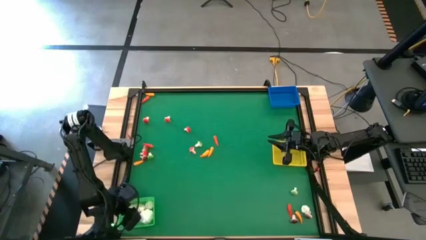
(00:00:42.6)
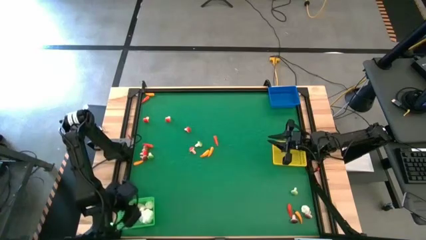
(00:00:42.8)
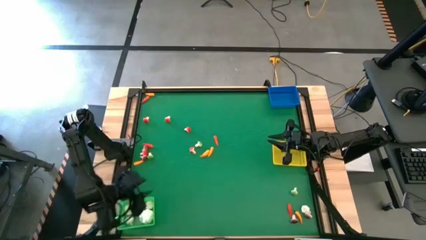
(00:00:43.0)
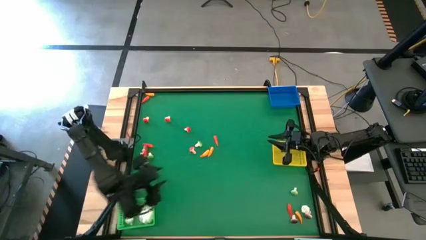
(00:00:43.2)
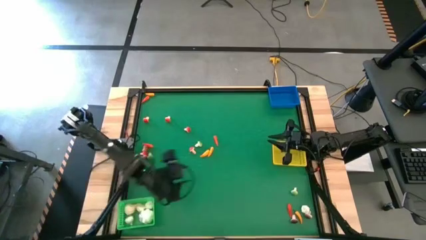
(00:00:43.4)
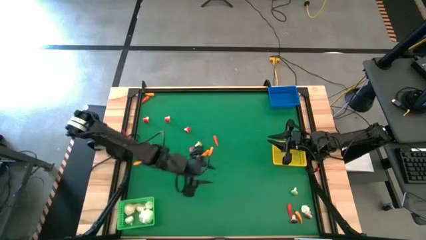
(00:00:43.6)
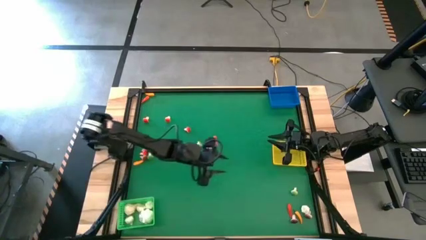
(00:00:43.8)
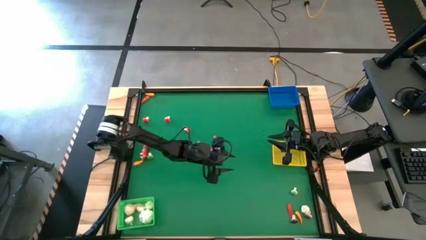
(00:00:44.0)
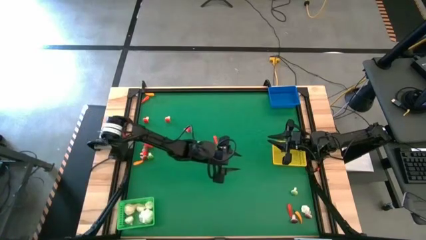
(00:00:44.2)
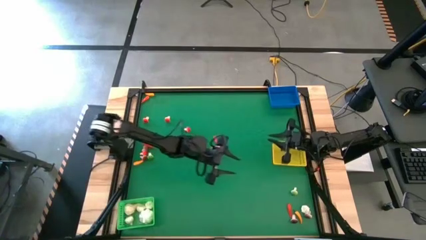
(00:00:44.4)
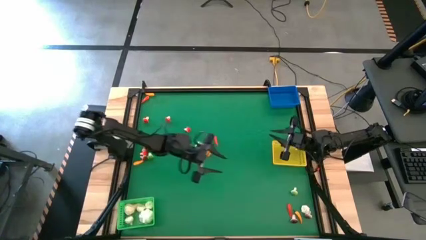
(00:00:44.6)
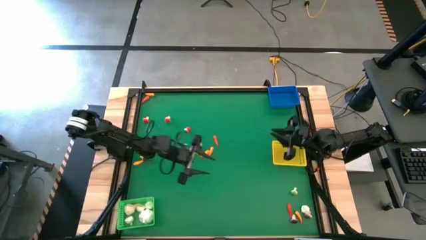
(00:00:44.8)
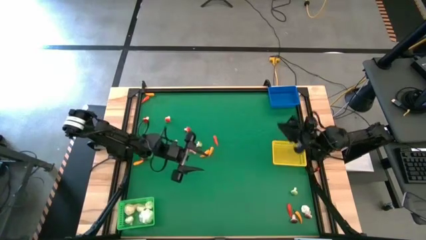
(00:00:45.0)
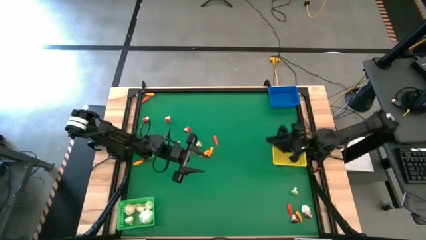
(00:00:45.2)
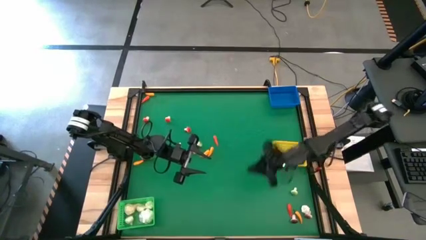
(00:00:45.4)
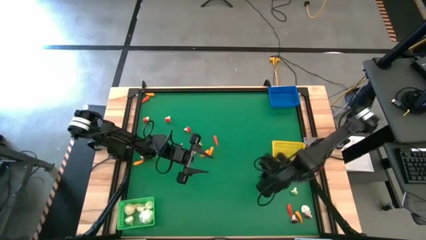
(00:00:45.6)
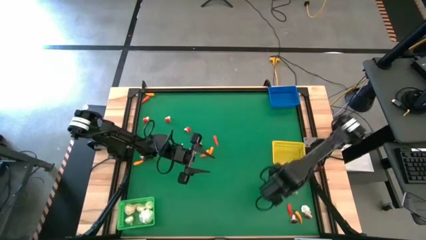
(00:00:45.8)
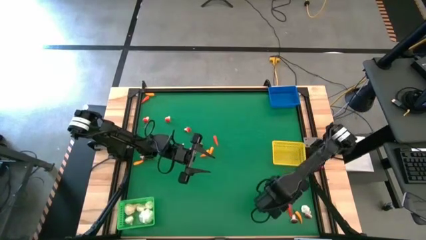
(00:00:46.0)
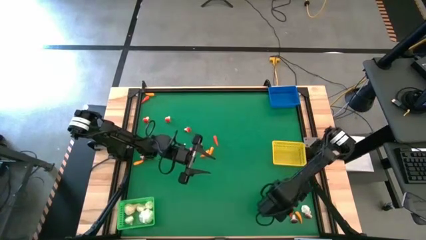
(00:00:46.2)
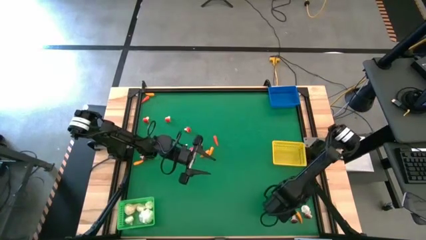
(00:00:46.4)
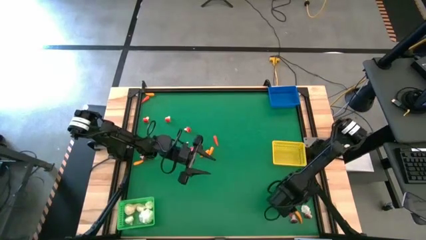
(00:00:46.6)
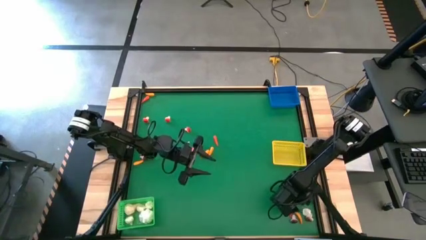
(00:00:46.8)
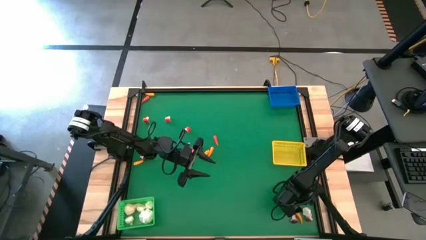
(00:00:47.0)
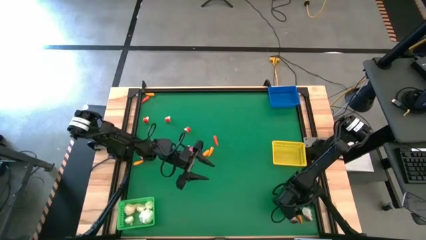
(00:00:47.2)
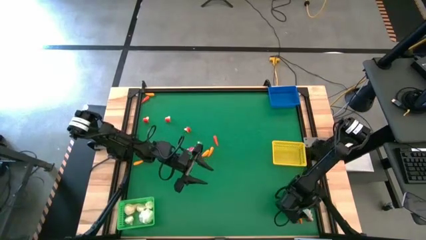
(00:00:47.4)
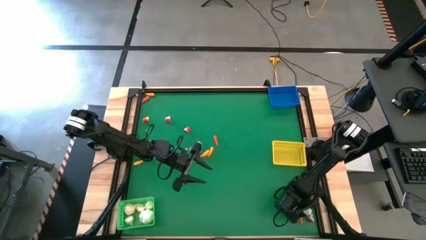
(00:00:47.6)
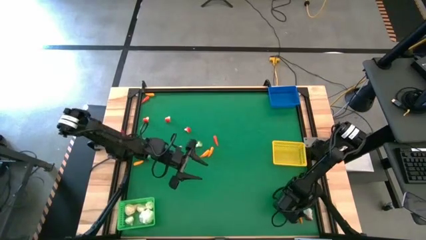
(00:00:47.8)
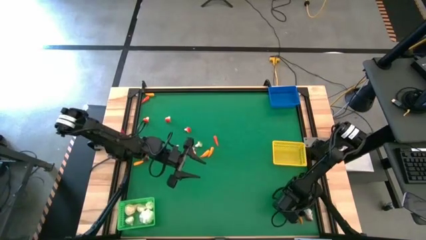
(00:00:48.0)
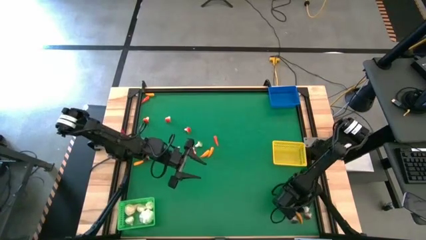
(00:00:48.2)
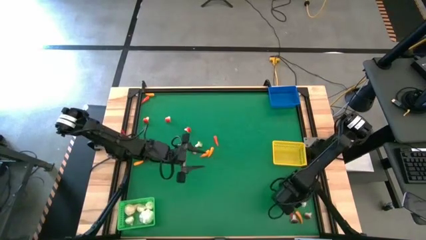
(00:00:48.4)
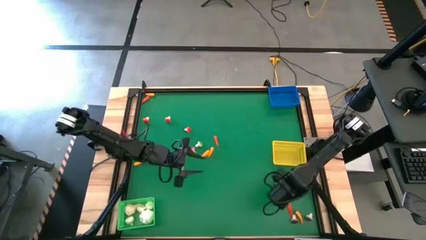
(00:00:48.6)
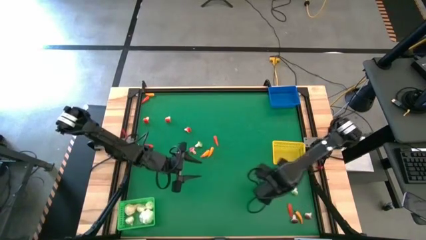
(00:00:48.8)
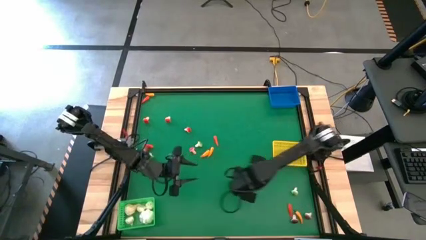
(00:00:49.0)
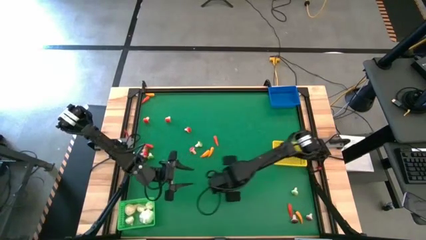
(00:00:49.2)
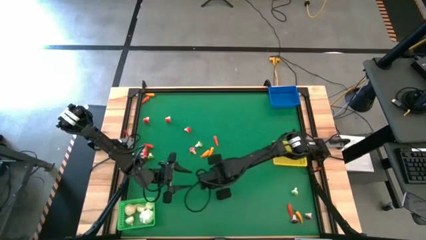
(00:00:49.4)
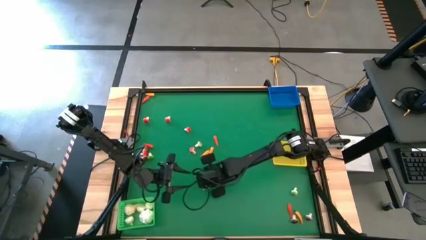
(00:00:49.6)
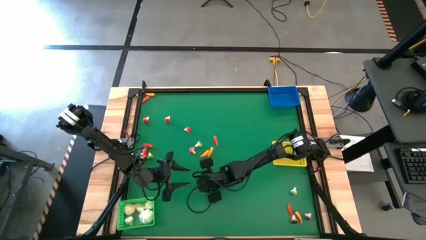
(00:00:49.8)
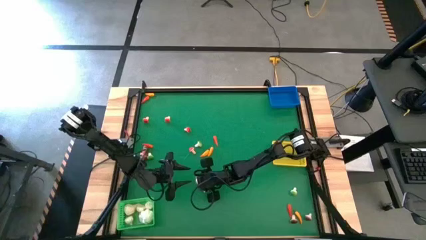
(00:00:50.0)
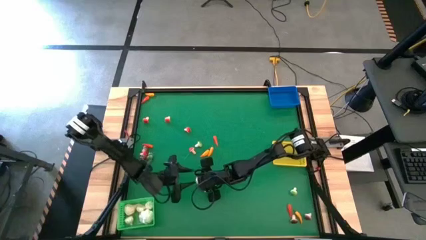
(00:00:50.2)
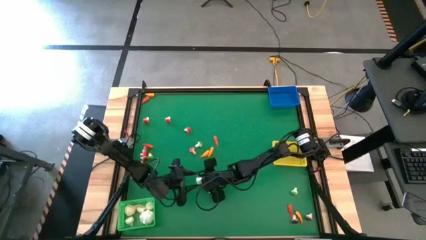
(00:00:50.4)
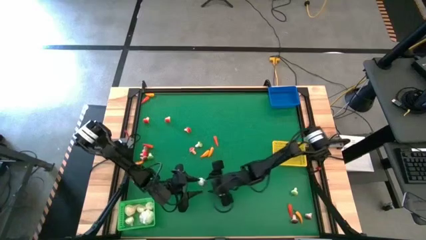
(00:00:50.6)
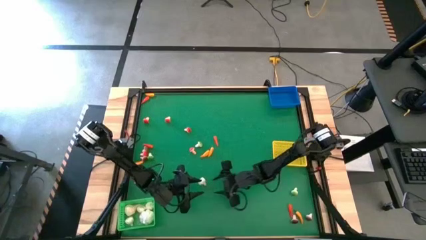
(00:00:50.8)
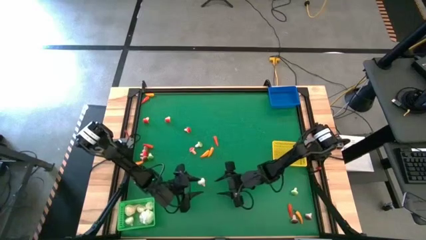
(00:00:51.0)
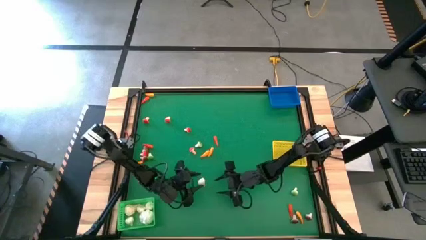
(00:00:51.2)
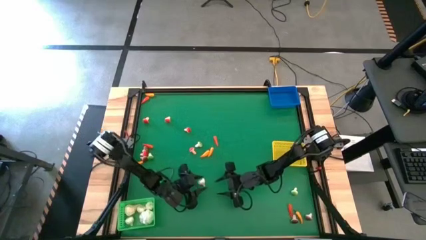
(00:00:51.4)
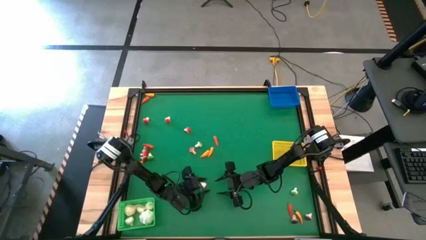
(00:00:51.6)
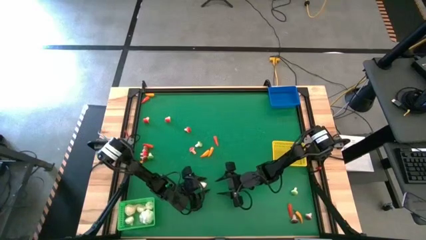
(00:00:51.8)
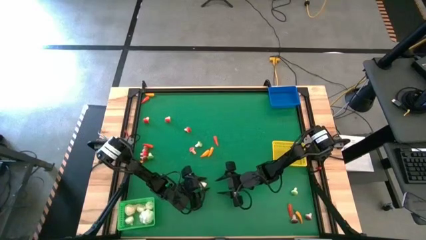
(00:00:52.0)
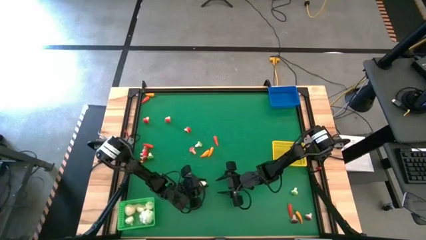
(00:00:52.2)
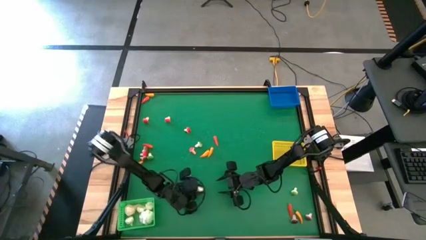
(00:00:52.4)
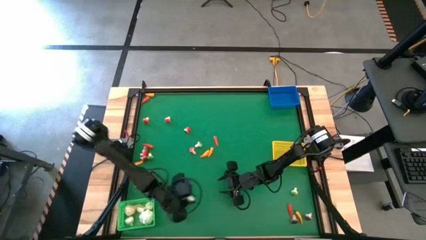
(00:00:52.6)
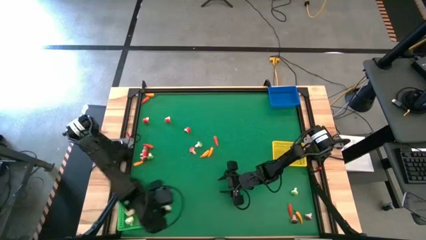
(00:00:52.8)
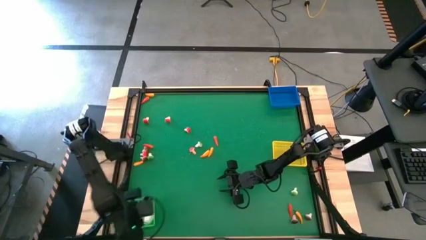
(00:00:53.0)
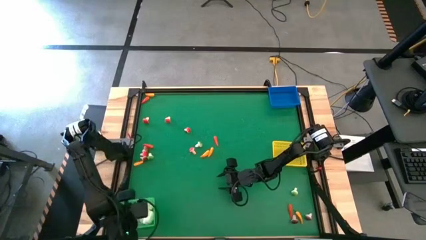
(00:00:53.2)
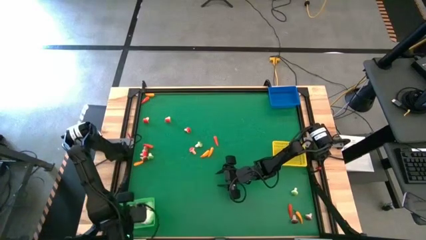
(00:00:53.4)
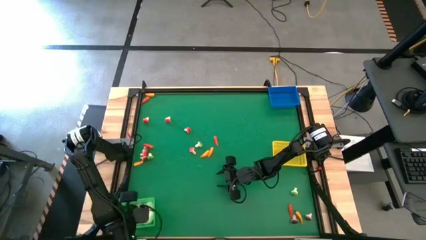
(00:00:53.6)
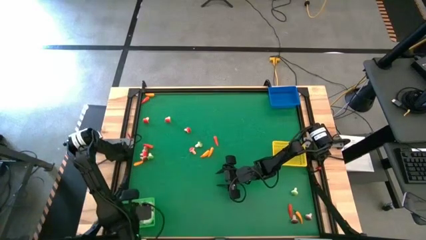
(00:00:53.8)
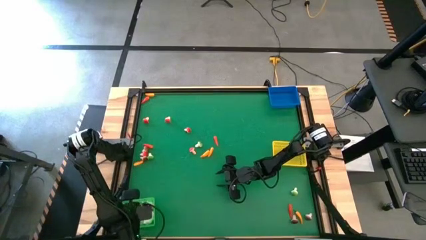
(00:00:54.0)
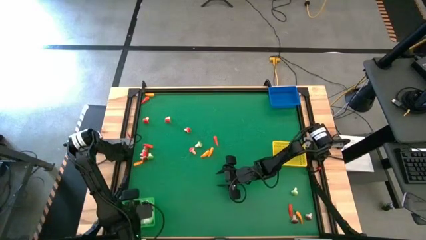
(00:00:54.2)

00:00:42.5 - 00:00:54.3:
Task: Sort produce into baskets
Put the white garlic into the green bin

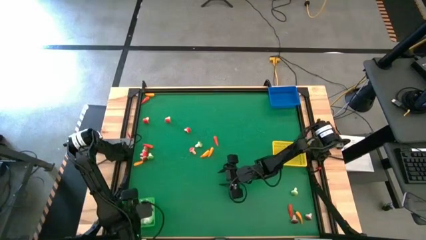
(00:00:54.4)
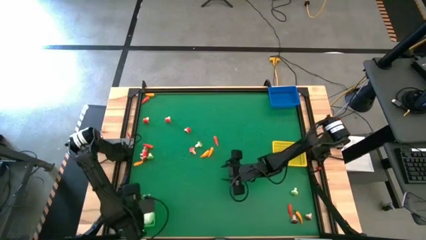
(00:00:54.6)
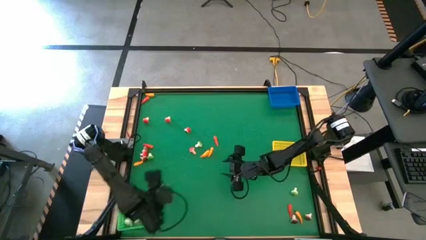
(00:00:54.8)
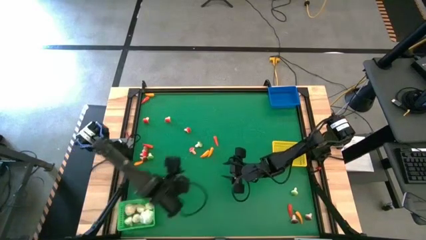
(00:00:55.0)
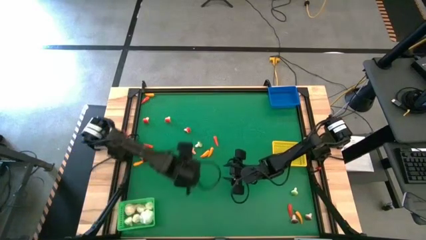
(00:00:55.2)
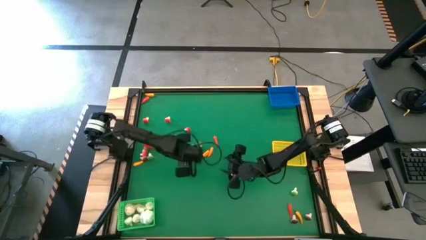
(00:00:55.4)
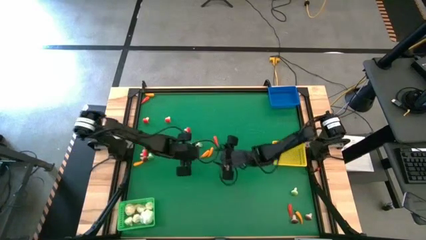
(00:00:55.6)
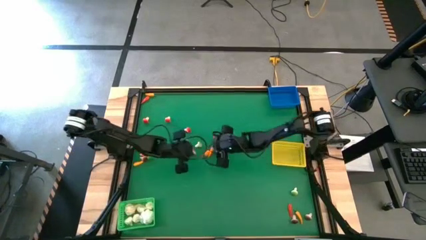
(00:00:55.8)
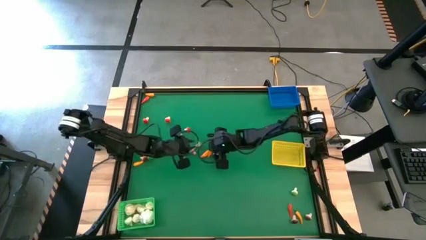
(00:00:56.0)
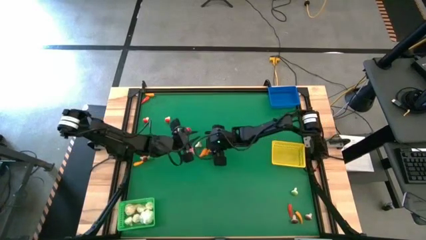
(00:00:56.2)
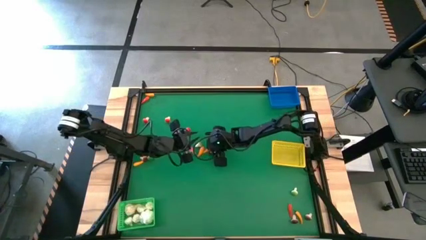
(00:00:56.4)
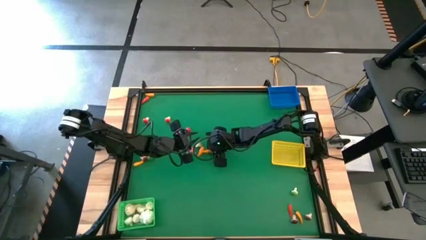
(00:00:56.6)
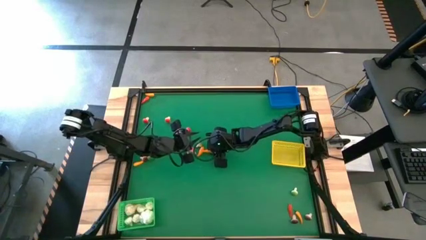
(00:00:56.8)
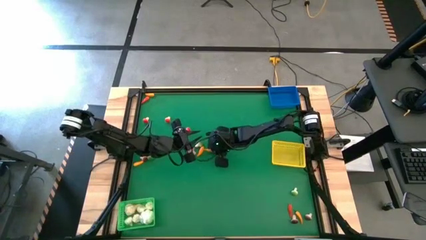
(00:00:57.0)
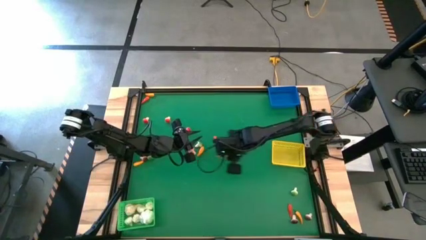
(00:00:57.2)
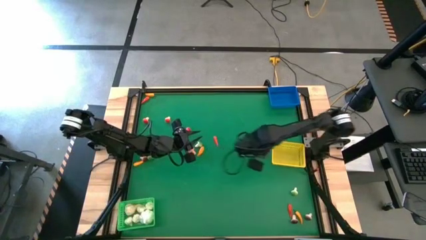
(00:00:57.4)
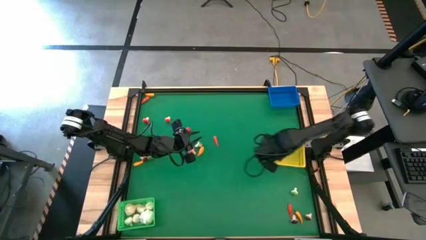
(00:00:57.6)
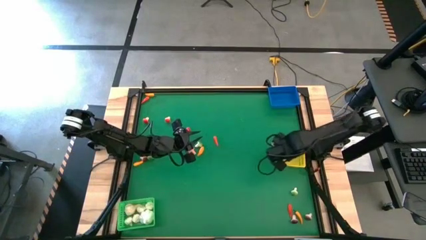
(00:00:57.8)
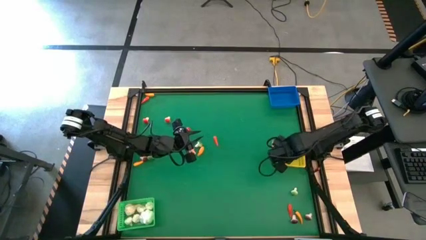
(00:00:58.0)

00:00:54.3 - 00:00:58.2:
Put the yellow chili into the yellow bin
